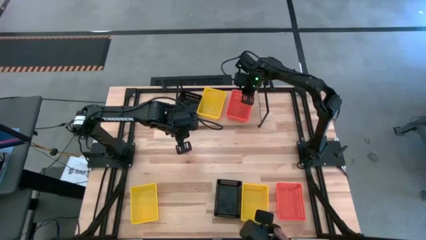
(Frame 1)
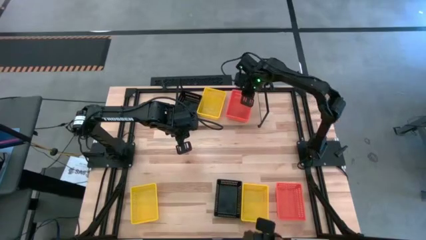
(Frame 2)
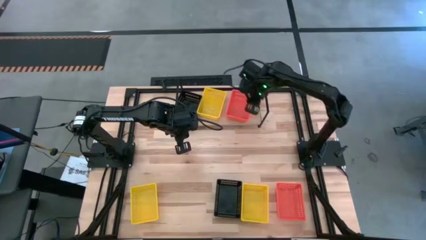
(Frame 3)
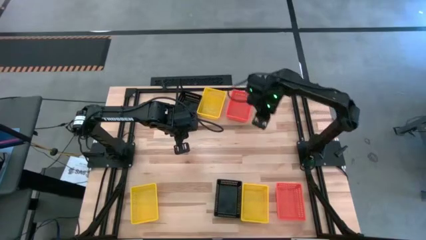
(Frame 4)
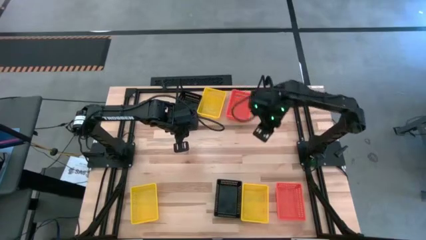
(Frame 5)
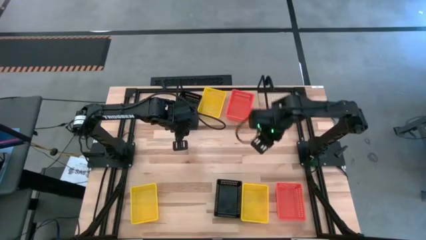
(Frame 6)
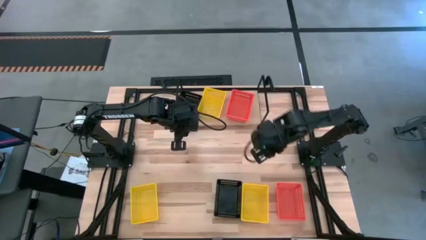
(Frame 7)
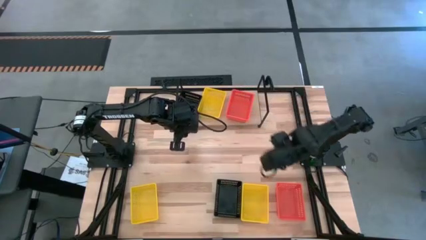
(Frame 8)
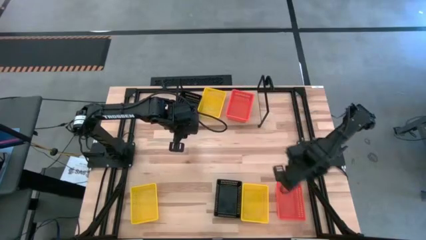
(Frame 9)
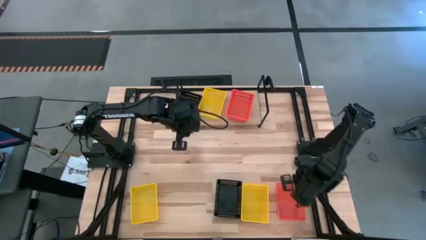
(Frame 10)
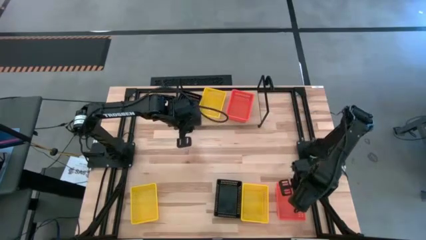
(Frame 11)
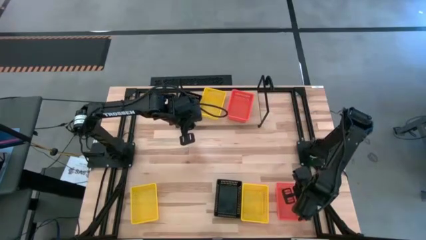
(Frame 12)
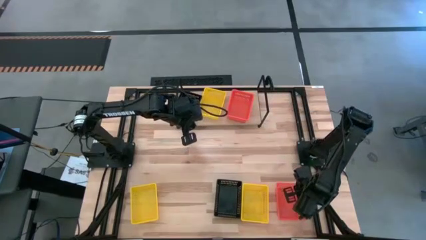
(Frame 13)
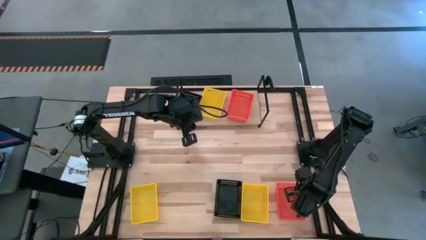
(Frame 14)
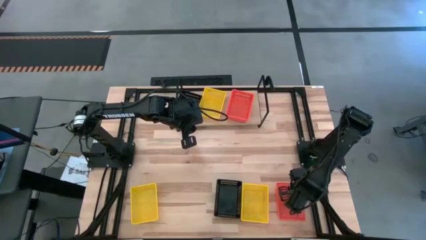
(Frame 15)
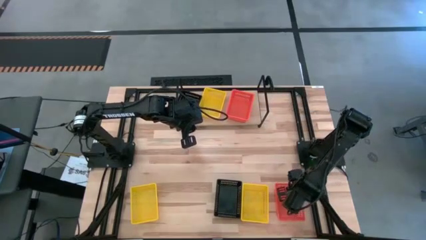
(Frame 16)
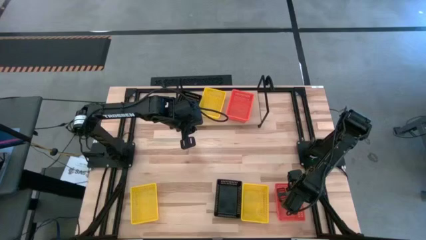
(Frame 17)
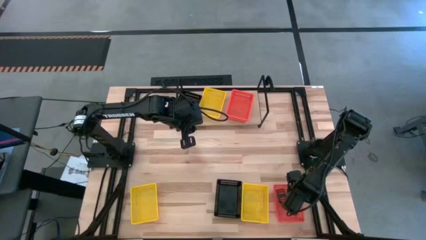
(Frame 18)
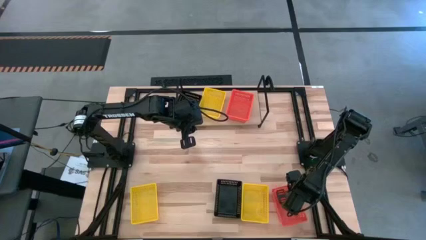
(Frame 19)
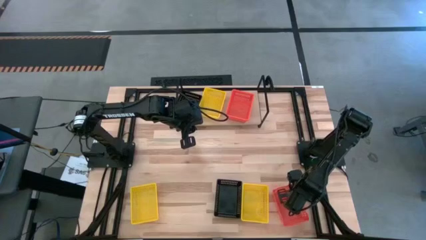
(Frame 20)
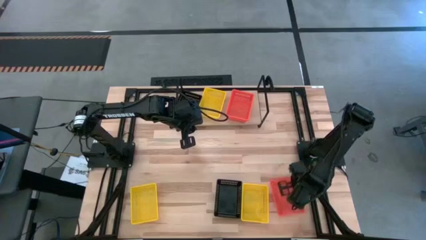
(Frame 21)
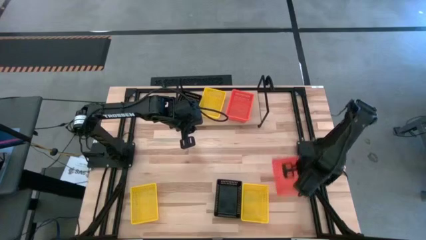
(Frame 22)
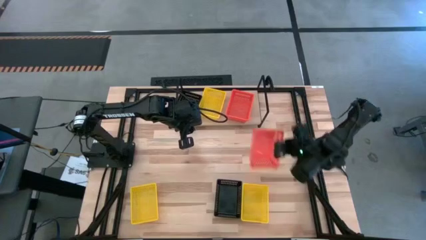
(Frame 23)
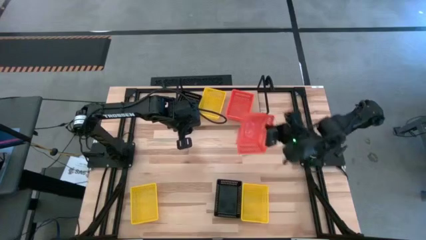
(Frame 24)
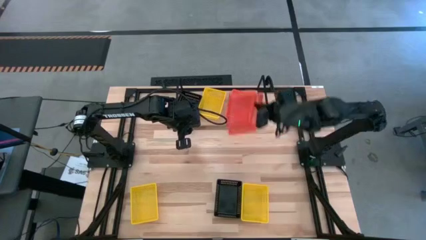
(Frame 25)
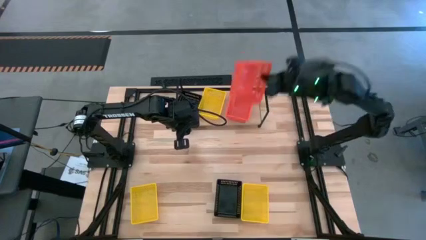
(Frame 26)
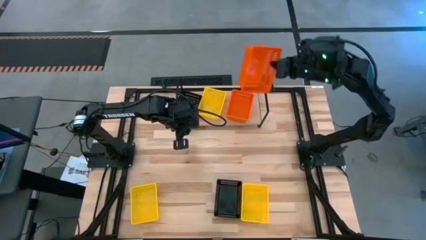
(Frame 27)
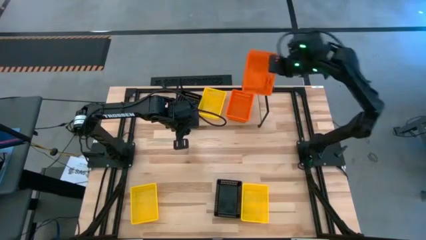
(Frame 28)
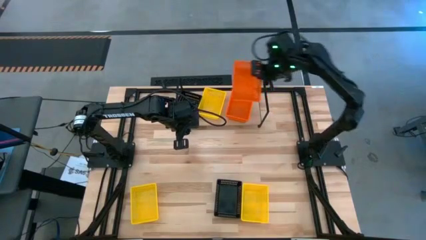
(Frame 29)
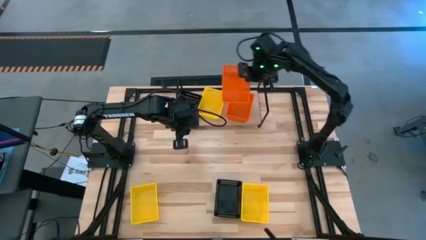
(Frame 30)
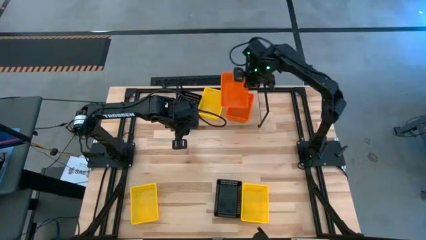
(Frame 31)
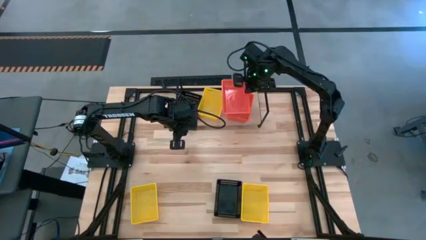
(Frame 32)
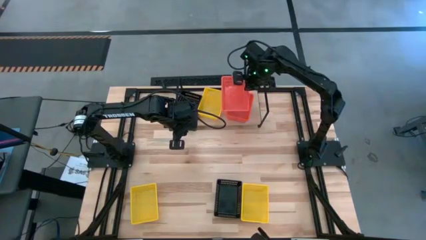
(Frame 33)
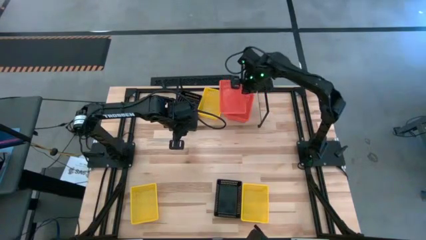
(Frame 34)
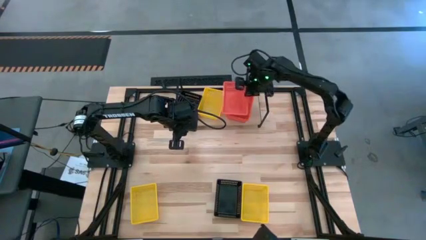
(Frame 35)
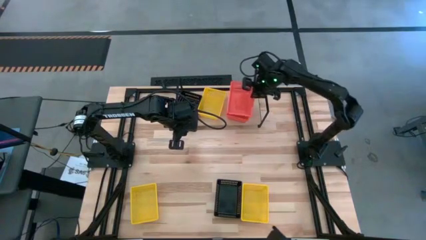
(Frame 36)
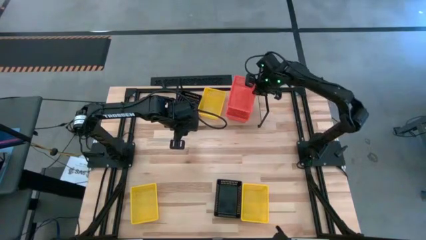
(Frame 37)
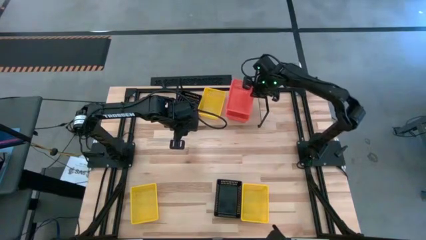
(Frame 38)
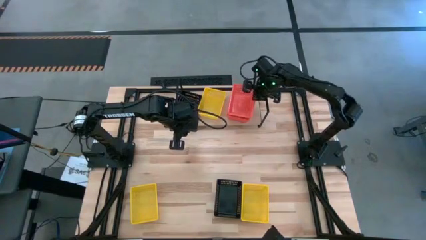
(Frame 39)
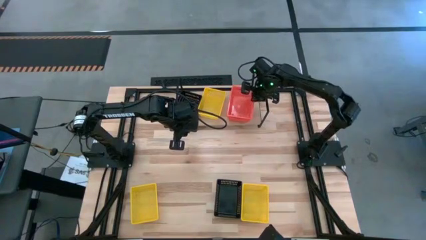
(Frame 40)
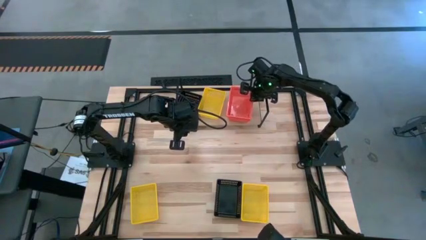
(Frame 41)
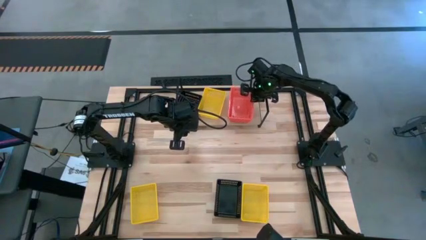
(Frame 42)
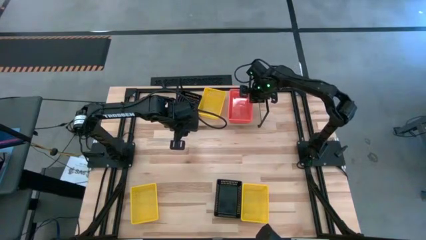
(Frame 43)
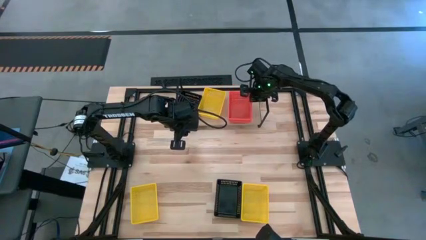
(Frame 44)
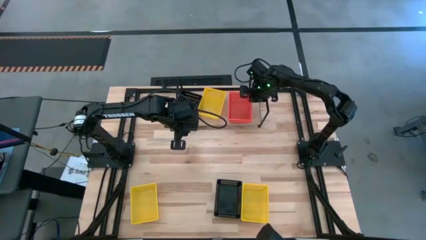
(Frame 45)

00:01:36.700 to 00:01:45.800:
Task: Stack baskets on shelf by color
Stack the orange bin on top of the other orange bin on the shelf

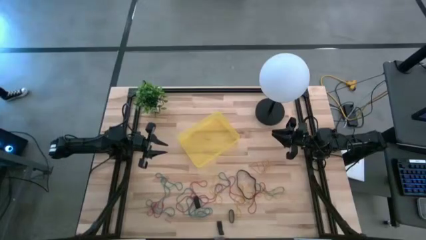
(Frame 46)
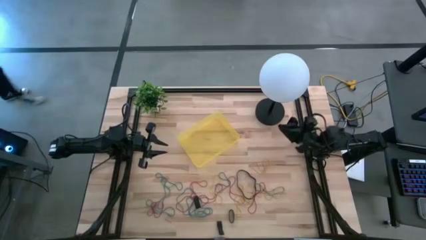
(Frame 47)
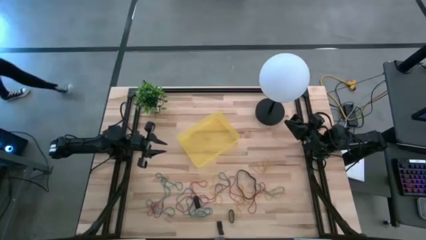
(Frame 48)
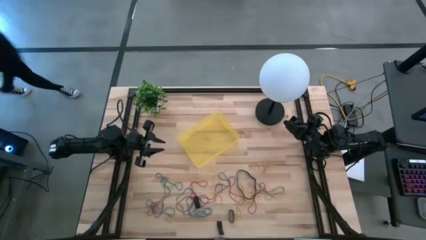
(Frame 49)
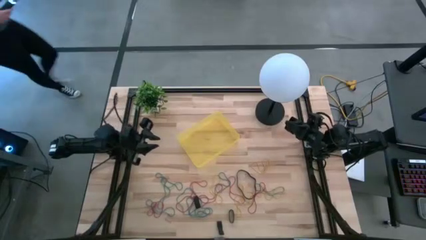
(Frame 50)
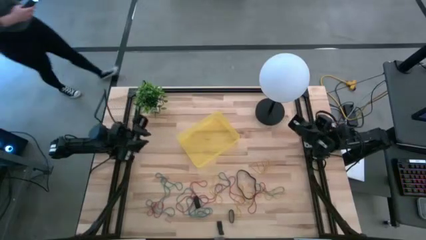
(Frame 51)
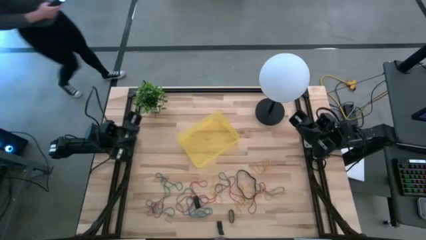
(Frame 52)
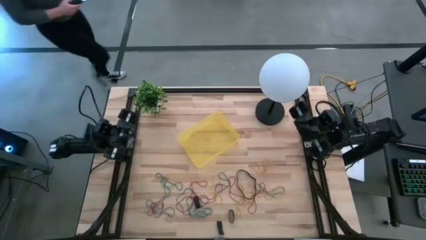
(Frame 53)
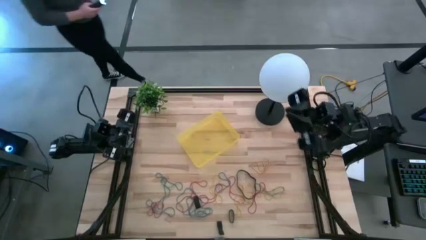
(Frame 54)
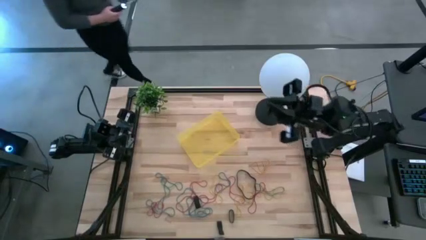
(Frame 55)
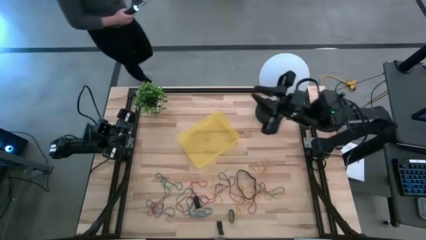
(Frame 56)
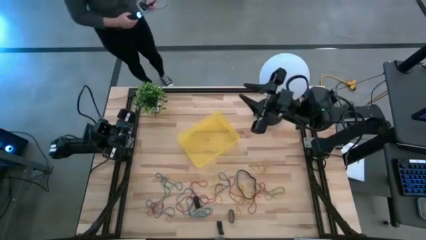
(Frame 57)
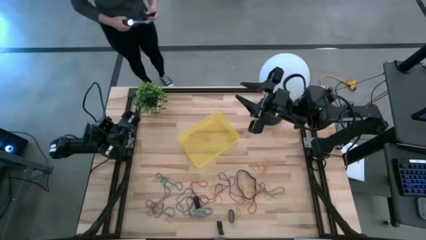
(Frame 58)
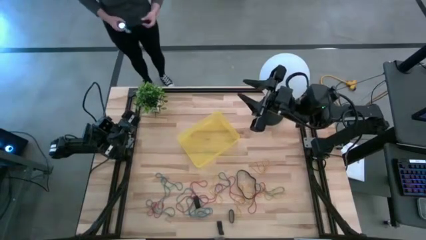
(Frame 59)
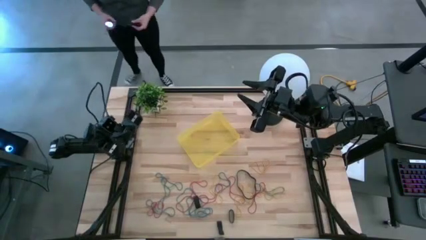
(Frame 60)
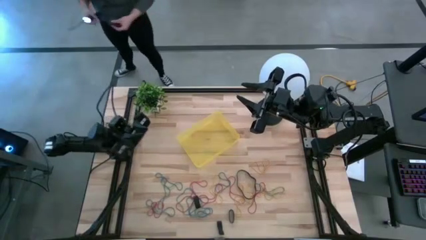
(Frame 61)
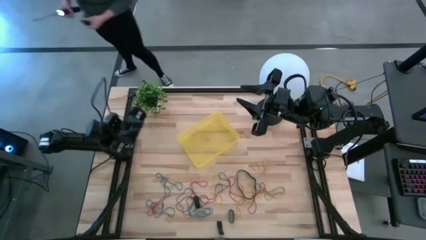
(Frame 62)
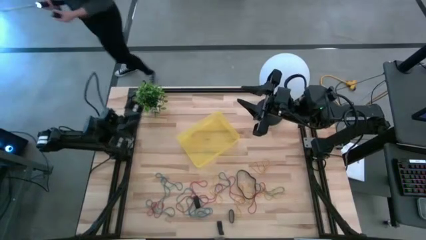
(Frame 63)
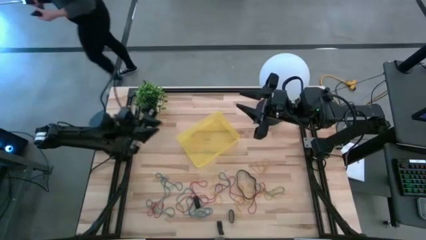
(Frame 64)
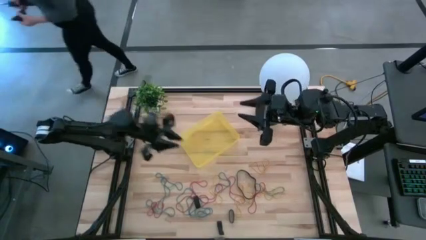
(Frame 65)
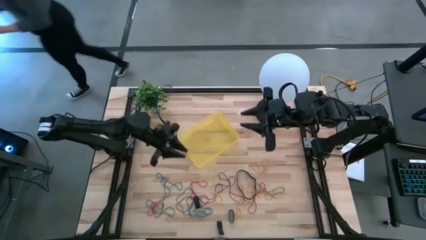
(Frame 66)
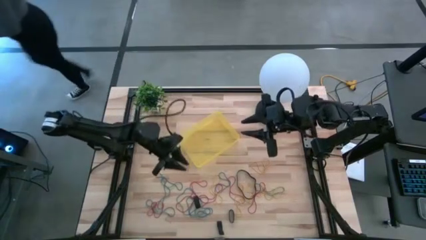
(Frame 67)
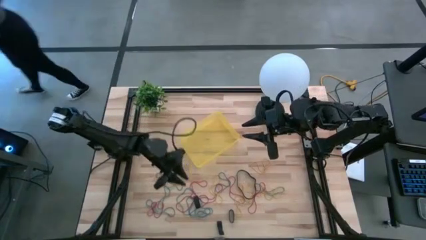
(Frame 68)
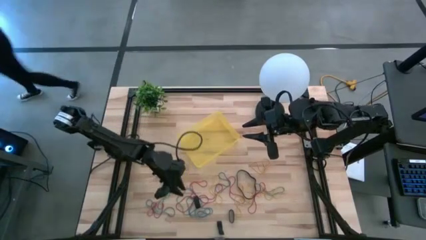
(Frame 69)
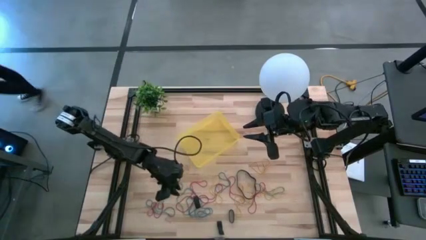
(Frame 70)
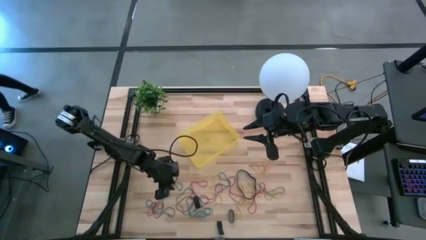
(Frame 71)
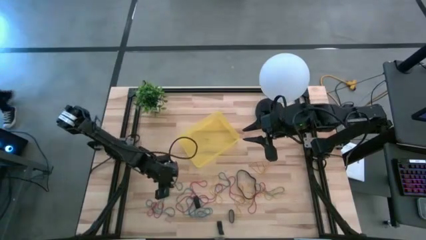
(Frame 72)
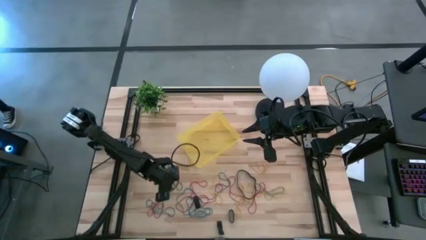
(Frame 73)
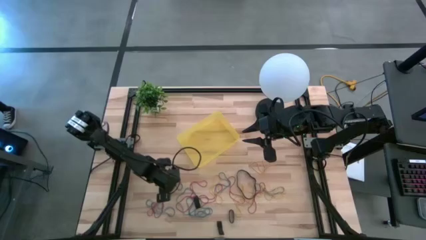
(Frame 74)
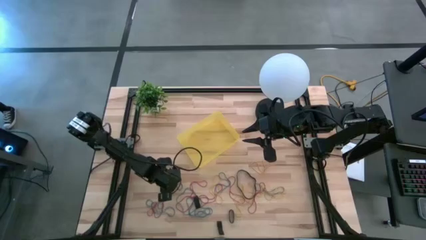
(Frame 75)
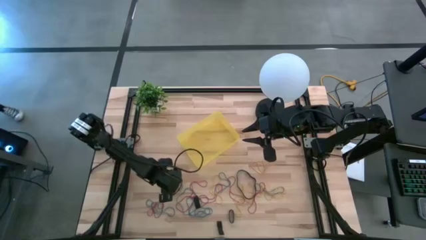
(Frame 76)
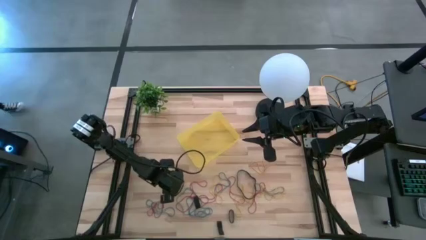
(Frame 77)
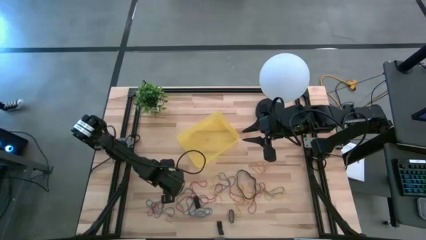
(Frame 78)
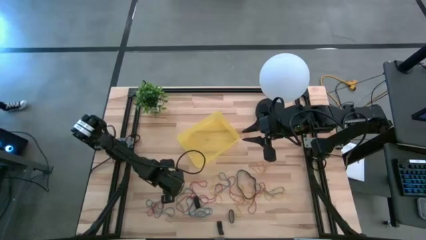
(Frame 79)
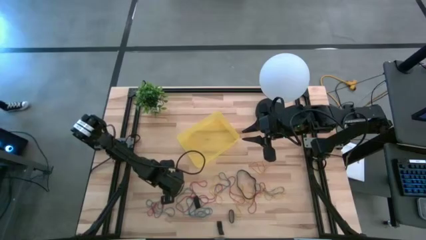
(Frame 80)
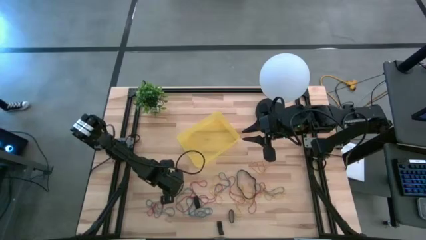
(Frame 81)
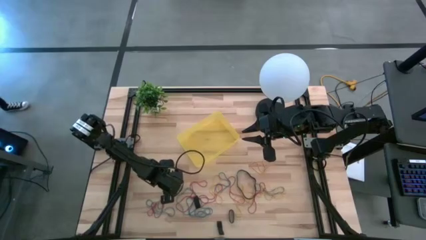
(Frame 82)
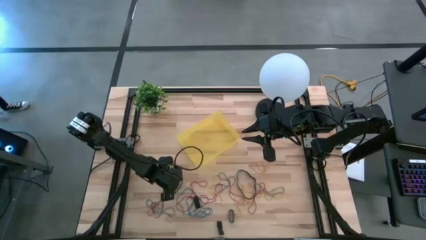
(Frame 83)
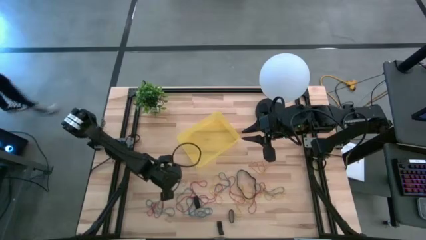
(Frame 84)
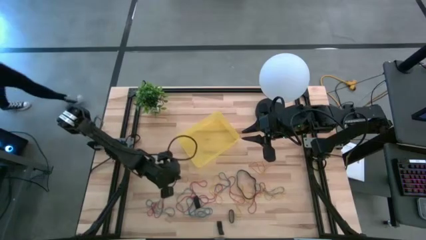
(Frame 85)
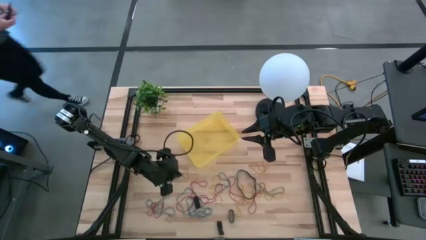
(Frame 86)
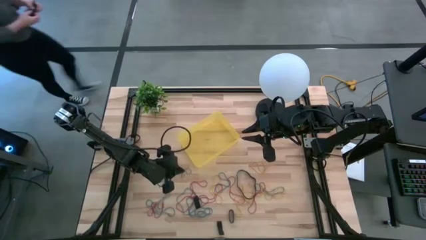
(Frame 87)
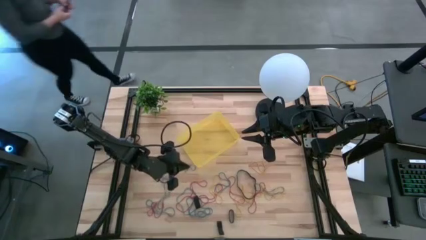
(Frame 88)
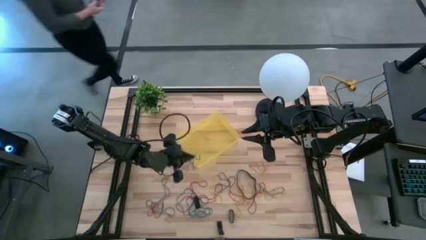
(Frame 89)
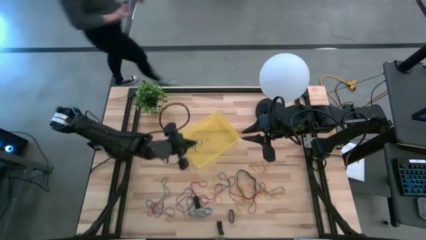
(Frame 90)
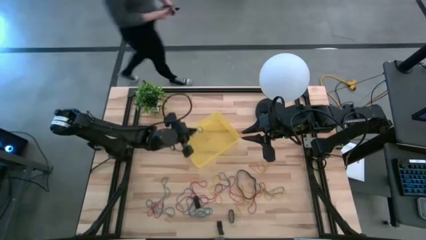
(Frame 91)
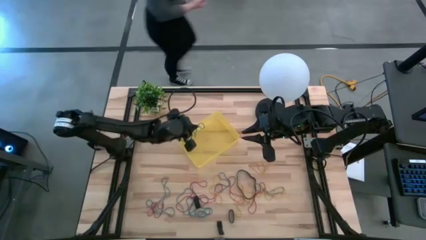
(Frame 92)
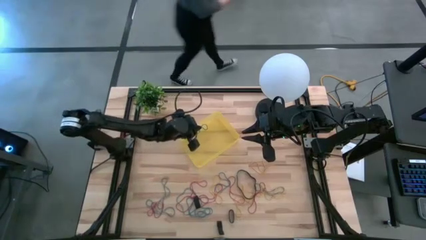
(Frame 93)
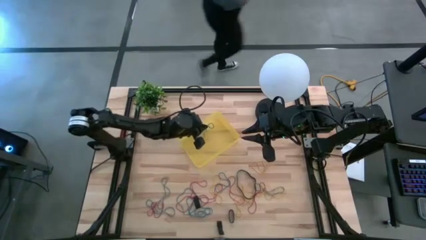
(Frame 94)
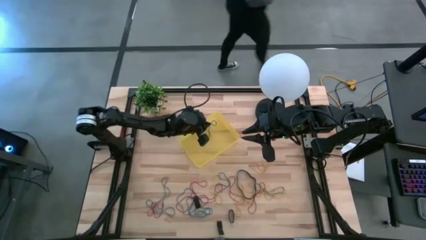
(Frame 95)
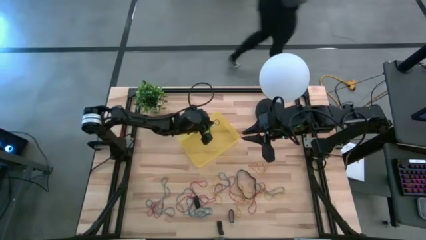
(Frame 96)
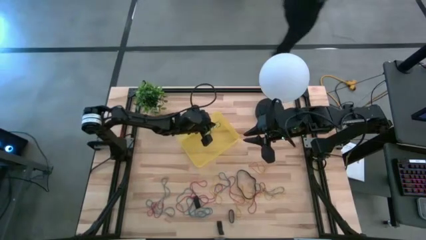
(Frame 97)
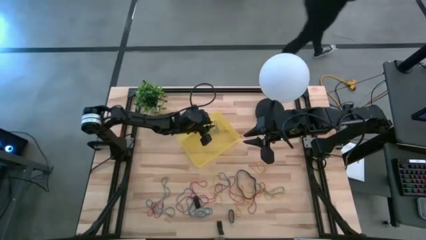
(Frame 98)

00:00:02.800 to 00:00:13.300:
Task: Pick and place rubber bands into bin
Put the blue rubber band into the yellow bin
